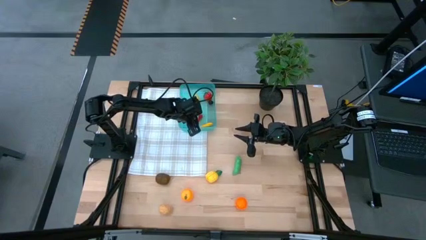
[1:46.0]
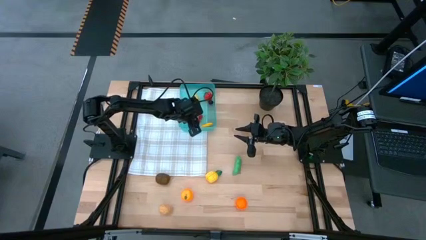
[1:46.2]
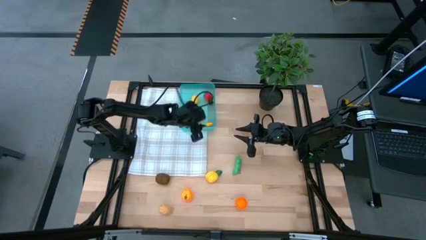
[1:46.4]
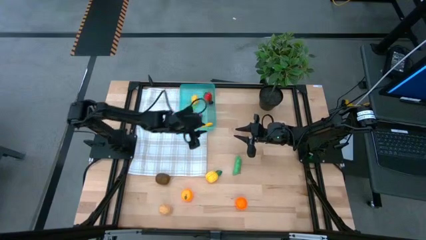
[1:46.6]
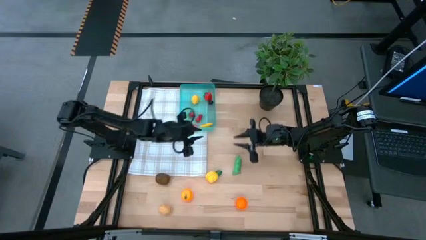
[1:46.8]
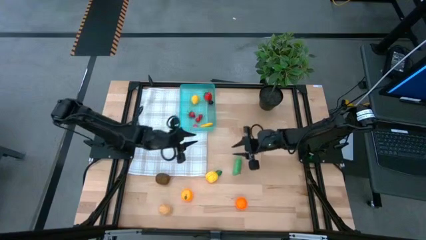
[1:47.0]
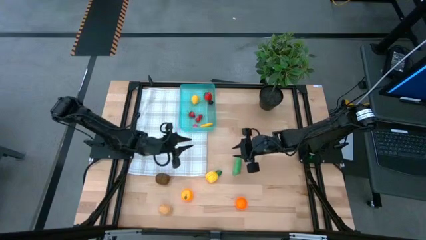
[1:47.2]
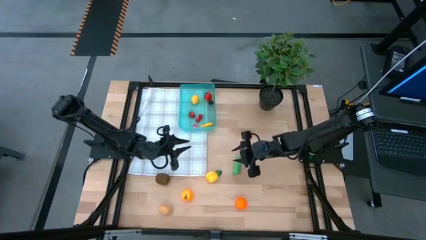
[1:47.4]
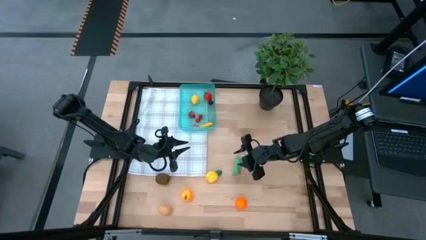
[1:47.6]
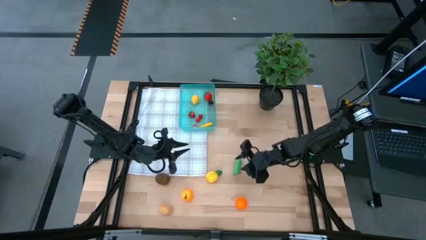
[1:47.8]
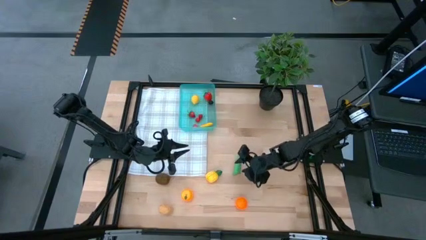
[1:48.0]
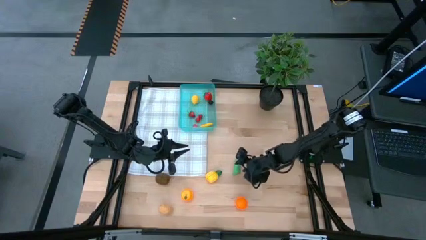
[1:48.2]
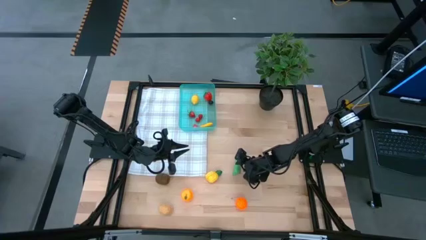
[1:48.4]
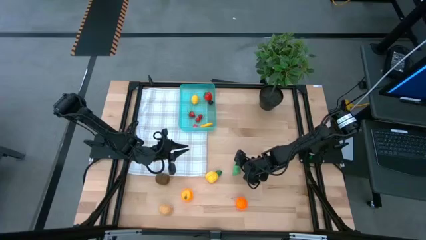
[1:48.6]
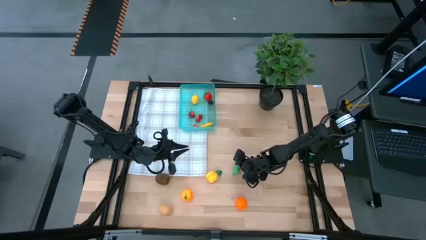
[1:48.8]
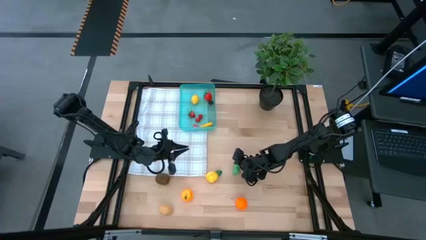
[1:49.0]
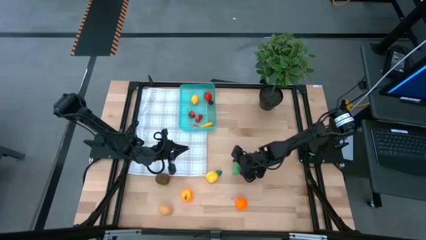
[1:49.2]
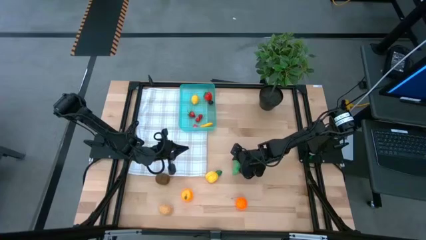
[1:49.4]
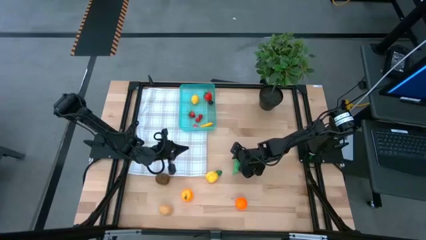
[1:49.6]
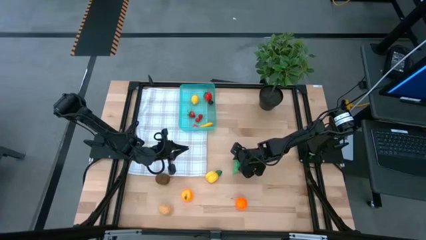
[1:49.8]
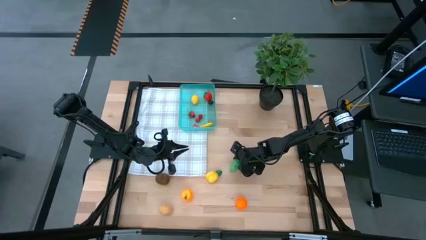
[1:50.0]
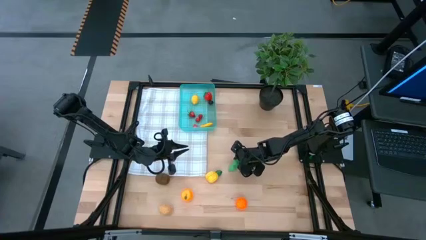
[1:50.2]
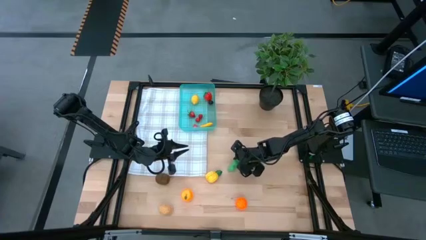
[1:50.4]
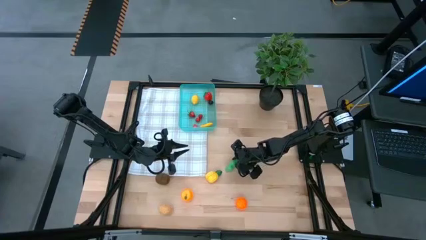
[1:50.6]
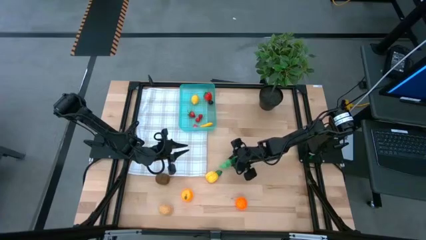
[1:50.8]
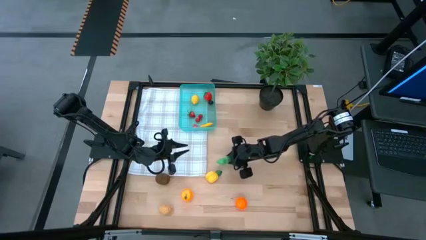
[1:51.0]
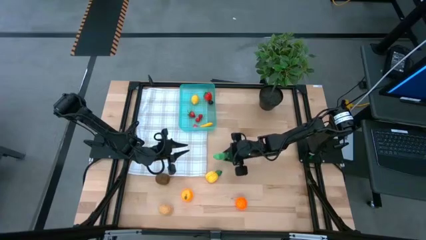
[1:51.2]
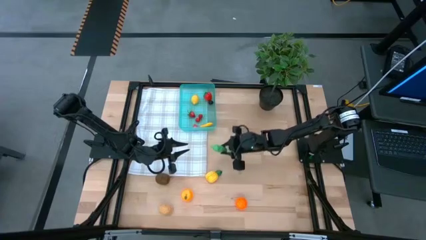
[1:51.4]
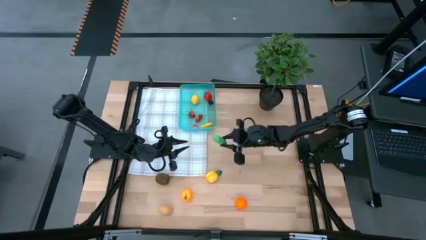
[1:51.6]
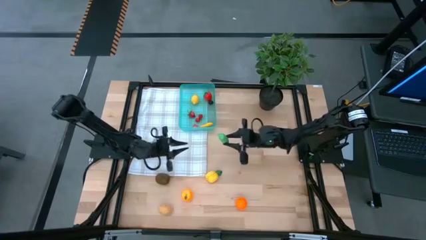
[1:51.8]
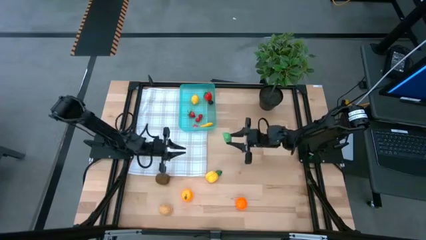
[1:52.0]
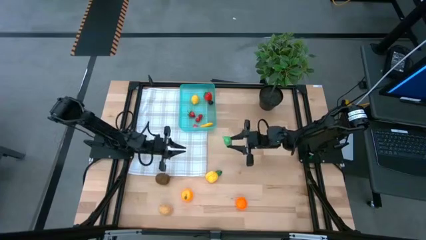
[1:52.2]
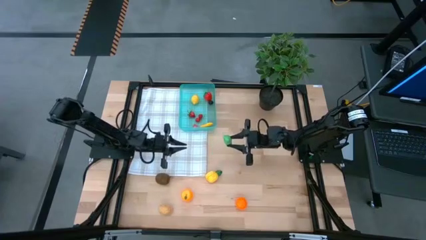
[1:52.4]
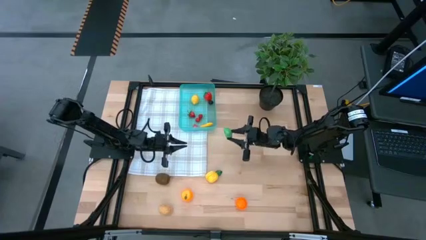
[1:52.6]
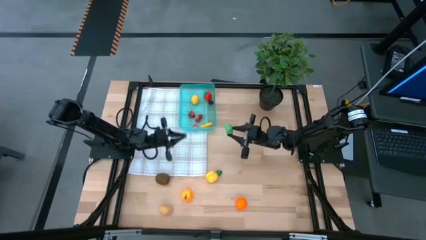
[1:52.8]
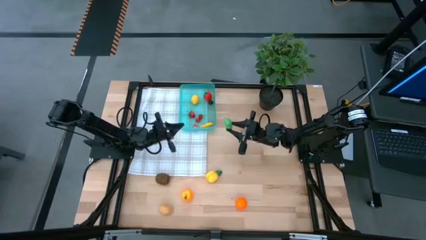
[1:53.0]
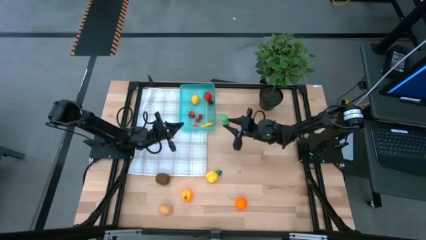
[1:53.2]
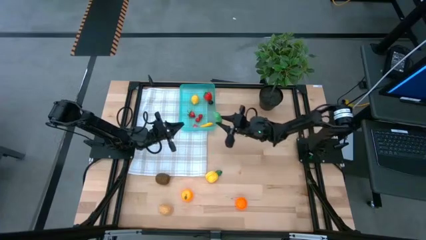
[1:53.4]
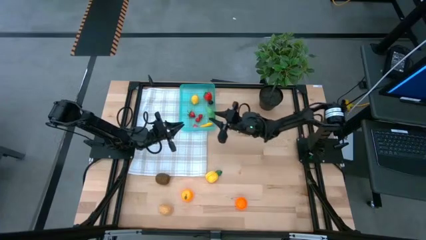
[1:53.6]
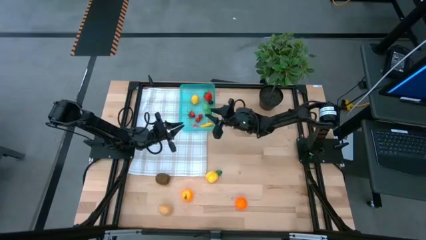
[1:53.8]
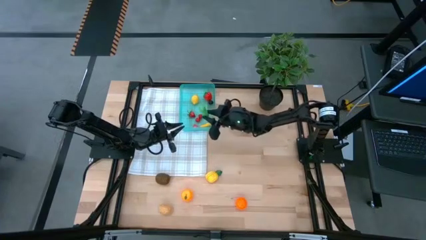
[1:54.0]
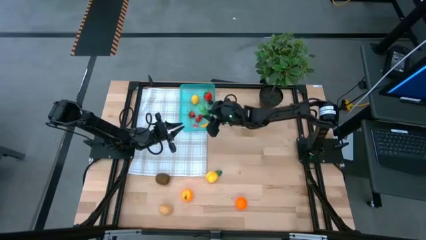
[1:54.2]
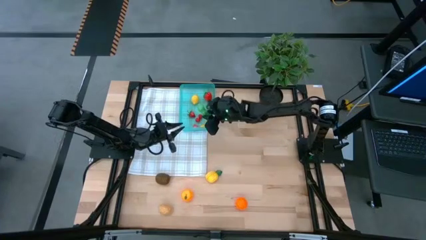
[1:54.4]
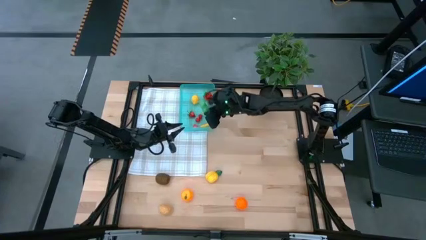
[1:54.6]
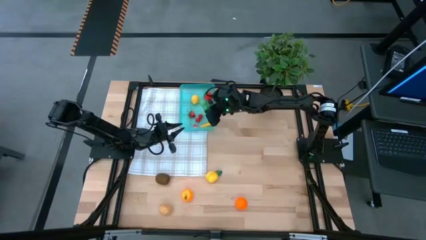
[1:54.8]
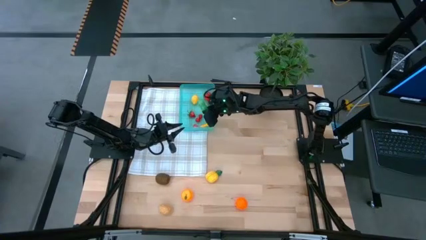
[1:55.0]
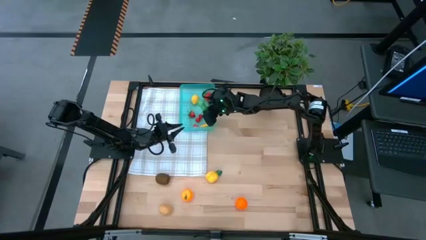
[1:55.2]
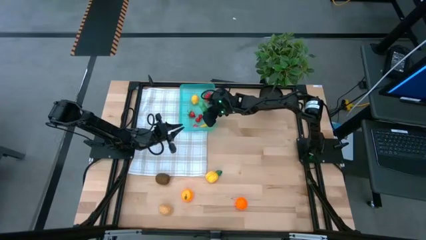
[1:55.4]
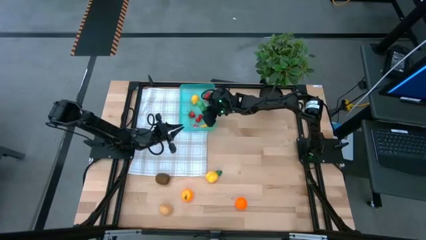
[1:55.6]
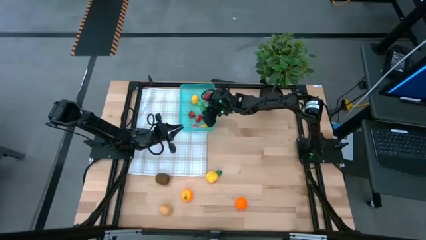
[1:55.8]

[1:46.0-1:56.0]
Task: Pick and placing Produce into tupperware
Put the green pea into the blue bin

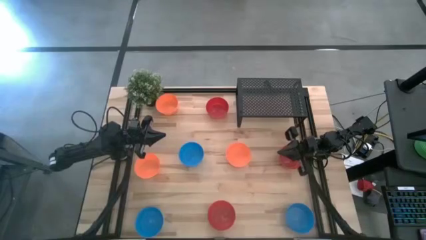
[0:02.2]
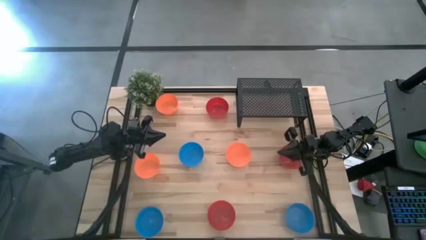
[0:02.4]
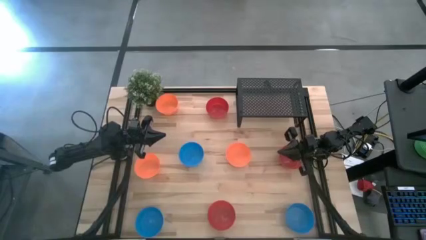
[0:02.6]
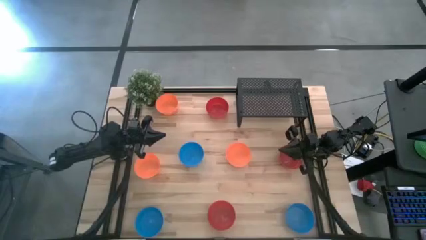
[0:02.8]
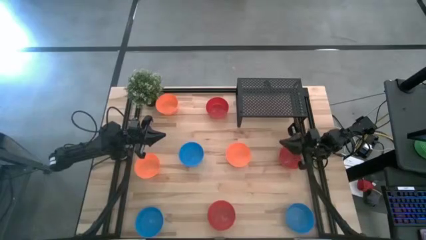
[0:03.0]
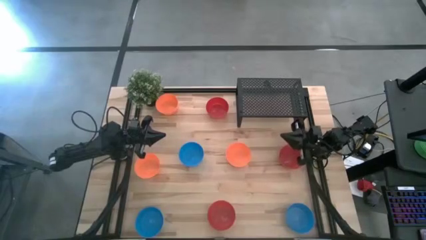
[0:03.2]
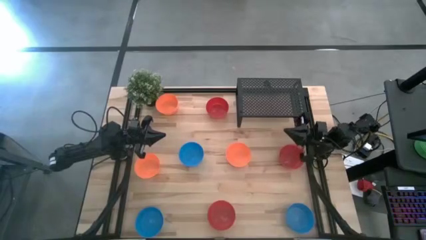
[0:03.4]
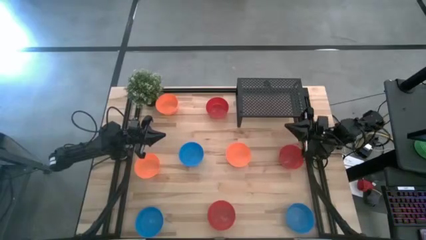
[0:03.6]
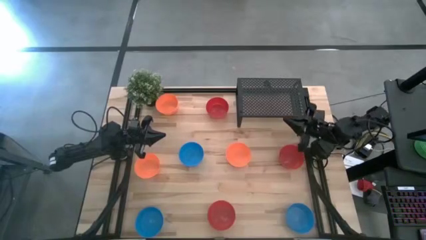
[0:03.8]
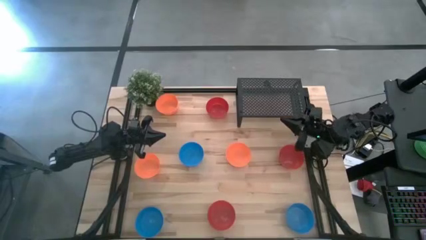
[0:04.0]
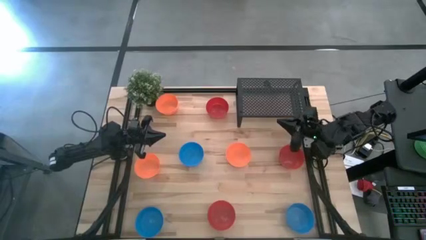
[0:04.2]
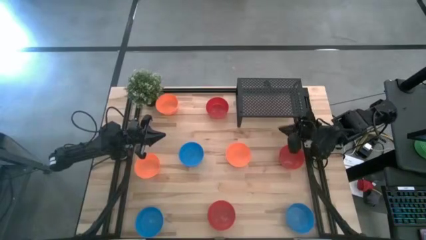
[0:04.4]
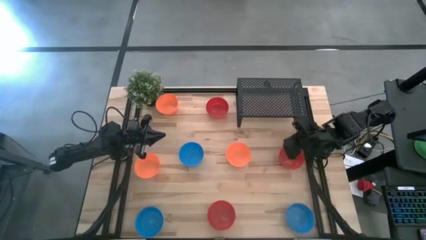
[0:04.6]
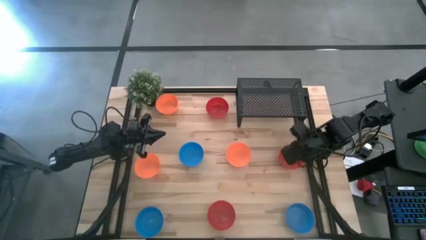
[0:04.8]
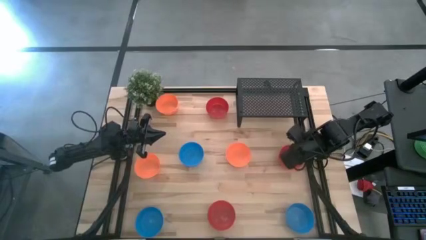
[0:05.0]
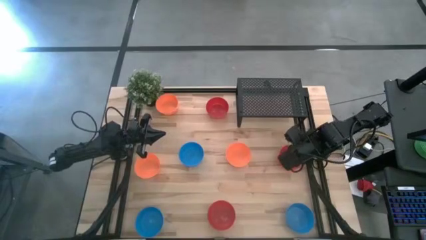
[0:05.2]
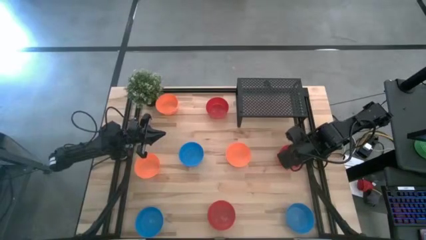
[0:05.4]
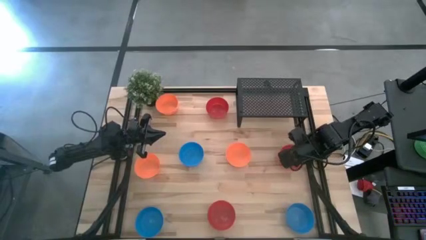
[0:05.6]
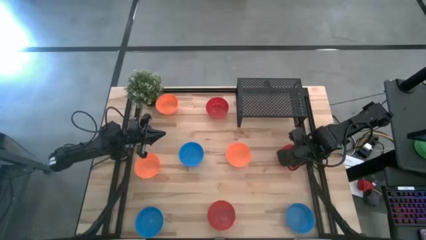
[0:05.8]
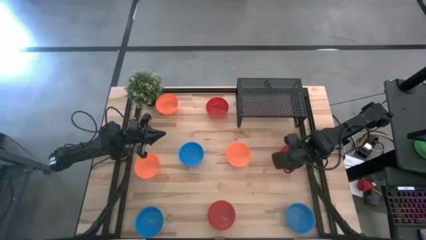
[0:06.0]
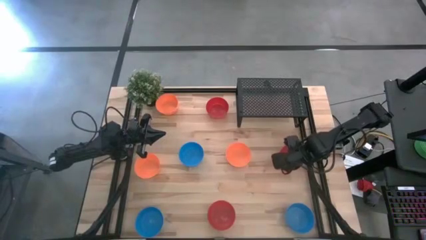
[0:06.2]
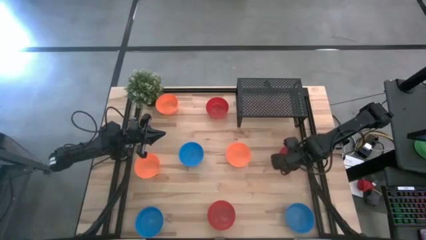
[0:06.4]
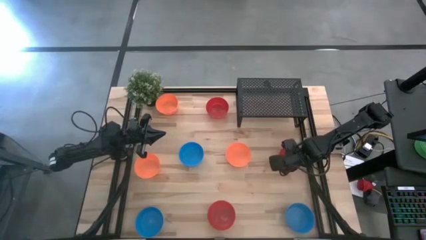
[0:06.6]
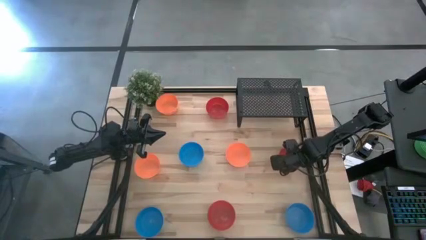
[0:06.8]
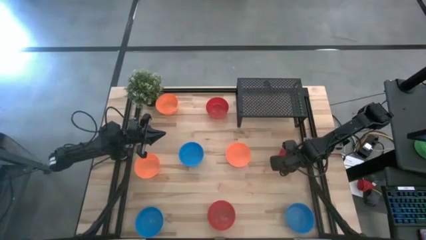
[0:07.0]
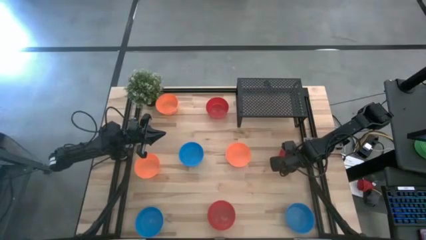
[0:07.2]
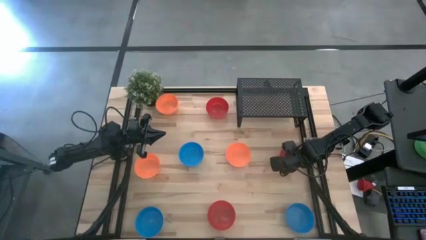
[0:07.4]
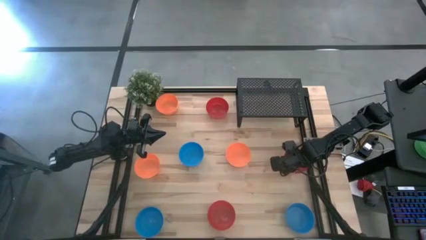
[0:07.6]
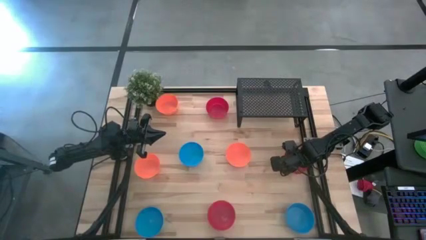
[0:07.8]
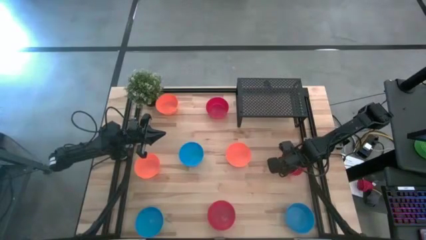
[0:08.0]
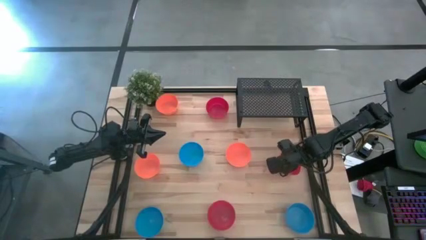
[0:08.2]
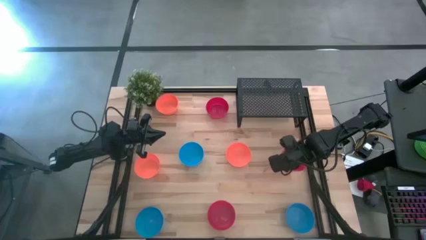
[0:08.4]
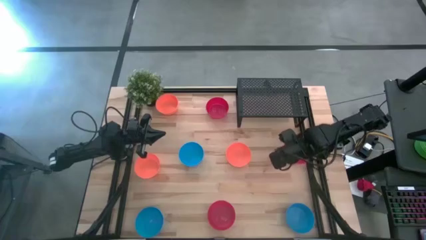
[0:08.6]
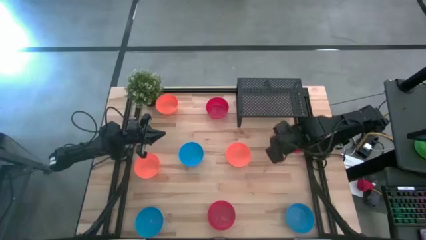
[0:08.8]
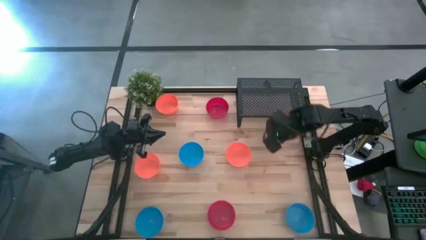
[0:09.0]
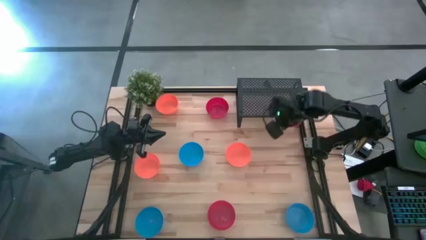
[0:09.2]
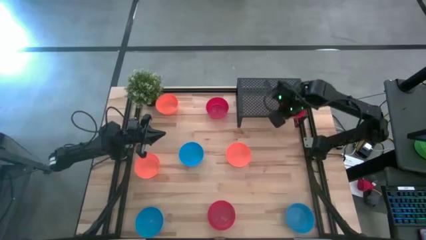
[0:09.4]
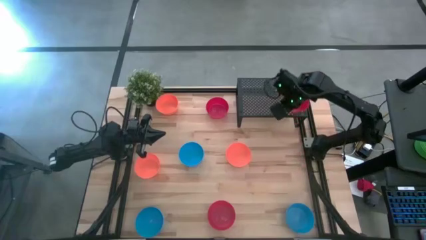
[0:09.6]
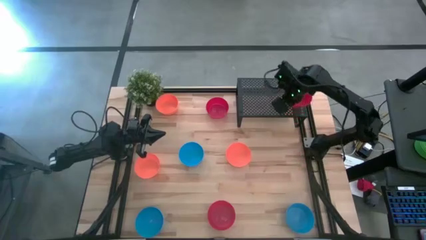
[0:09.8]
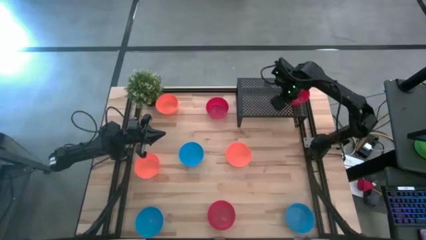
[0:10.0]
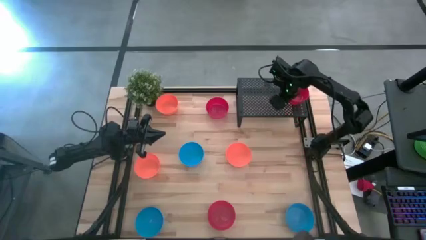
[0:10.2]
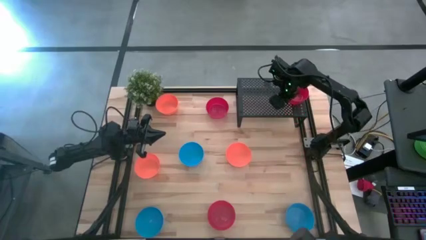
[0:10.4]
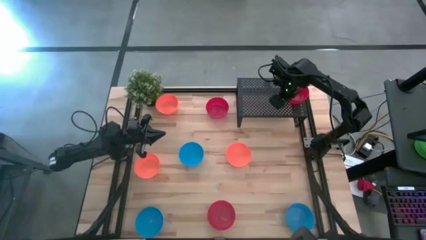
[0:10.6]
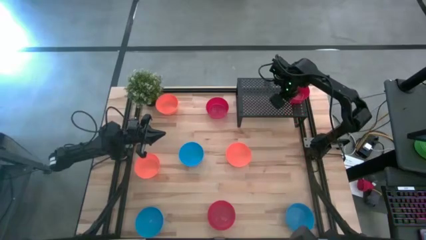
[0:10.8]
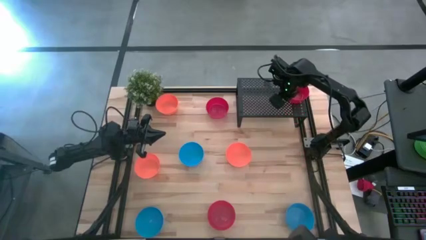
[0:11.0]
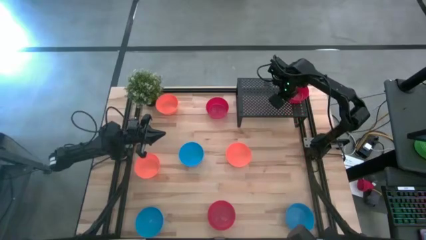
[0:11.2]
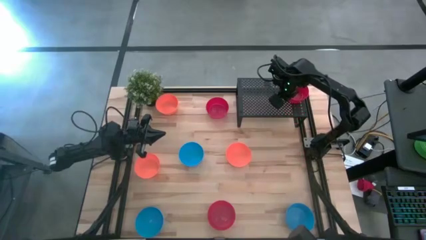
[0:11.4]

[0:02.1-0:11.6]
Task: Pick & Place Mini bowls
Put the middle red bowl on the shelf
